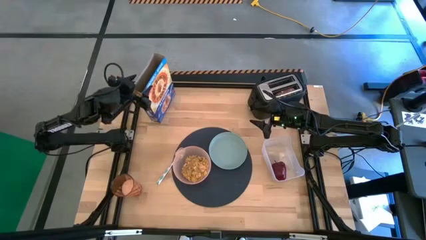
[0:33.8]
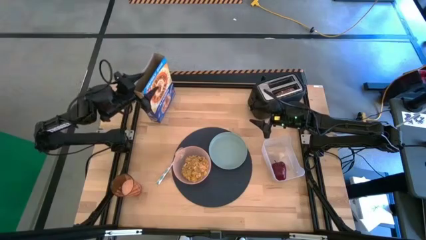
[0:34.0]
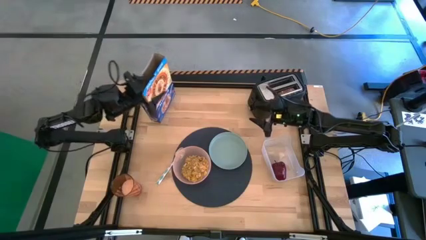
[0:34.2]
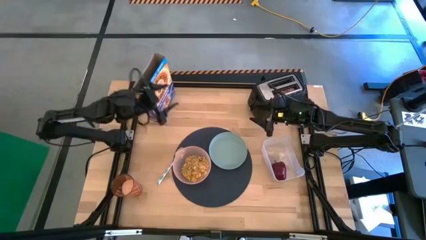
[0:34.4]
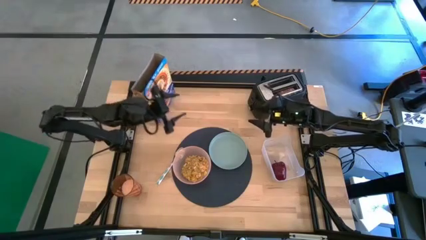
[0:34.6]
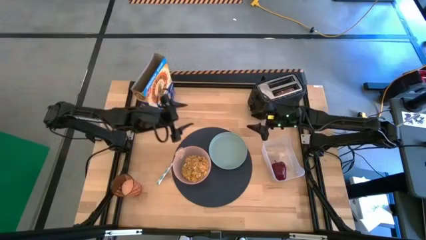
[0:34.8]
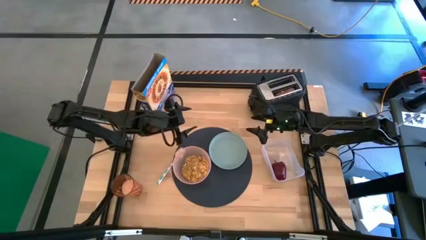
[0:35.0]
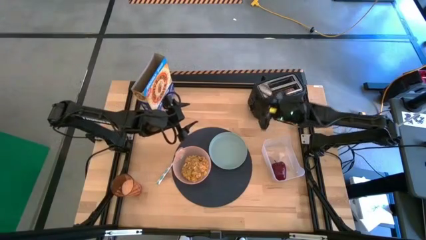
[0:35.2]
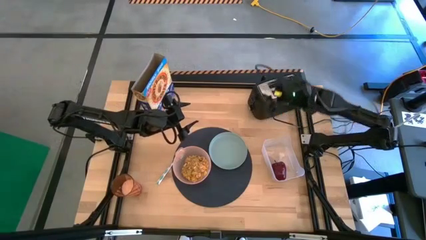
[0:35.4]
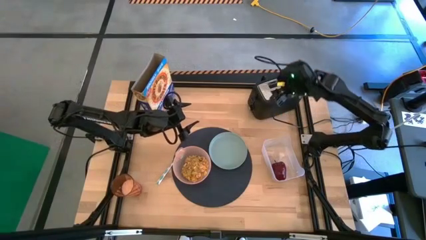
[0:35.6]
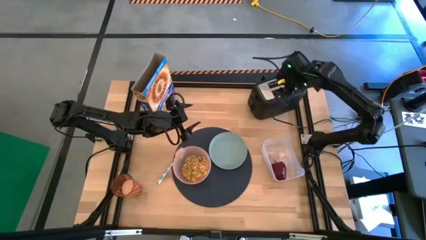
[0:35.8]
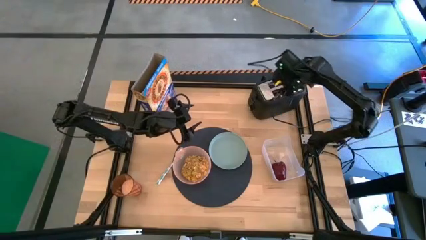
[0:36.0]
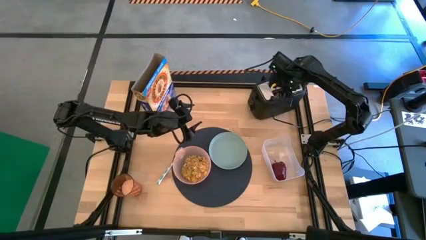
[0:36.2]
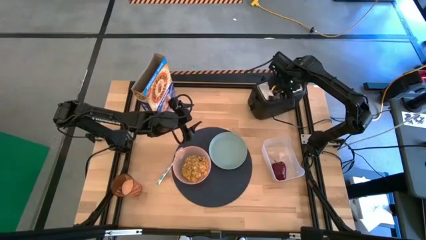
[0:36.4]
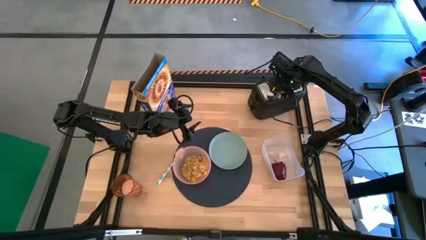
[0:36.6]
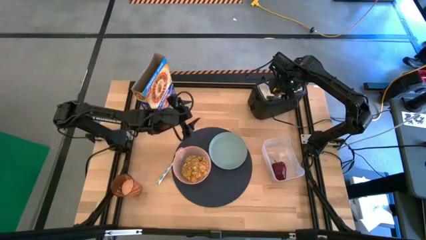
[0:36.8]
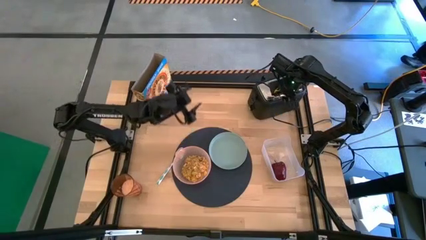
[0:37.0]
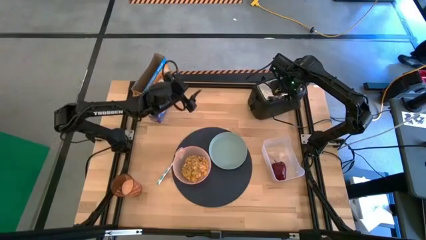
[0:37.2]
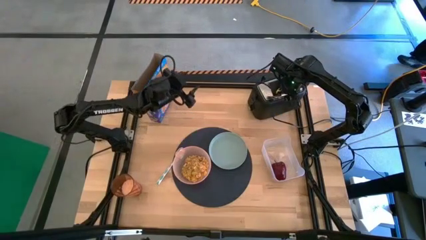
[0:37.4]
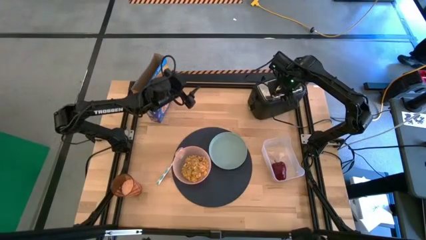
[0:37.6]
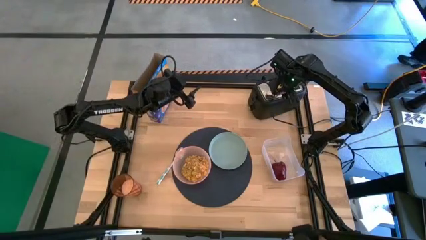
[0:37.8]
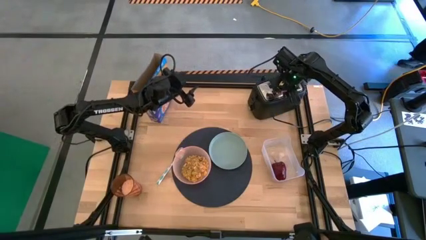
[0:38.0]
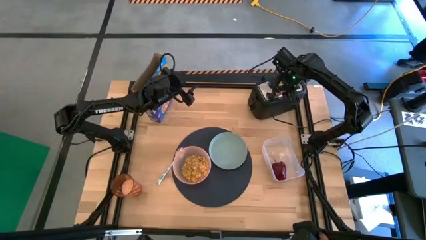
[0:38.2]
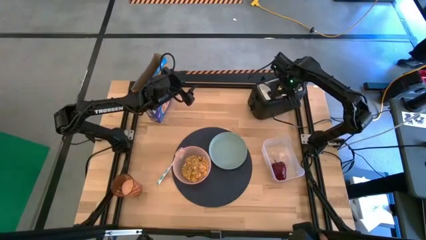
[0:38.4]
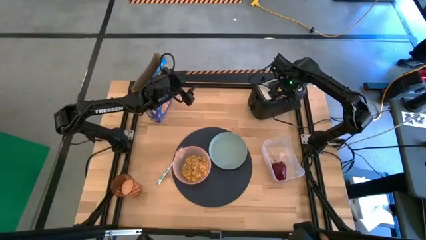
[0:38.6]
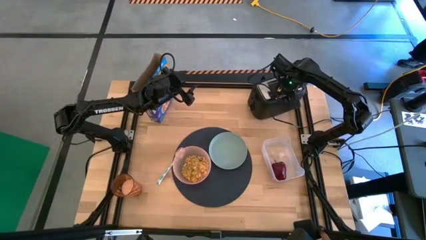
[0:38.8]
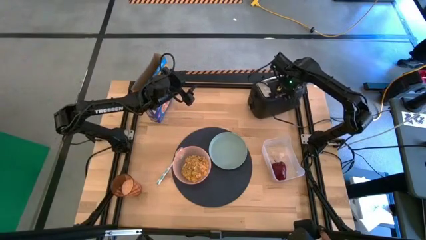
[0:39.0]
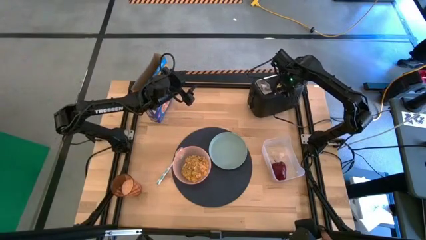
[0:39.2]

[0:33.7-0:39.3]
Task: Arrange a breakfast setting
Put the toasted bread from the toaster on the blue plate

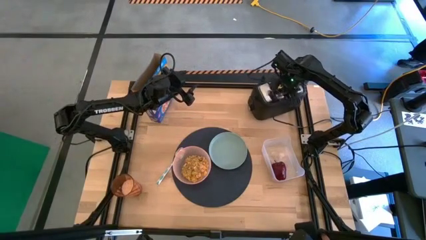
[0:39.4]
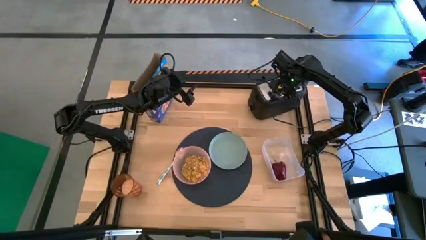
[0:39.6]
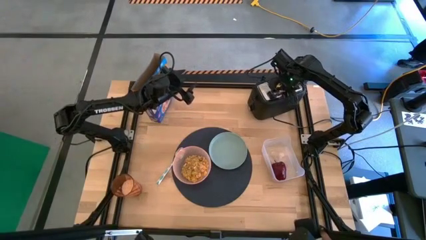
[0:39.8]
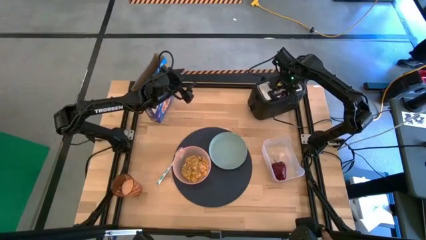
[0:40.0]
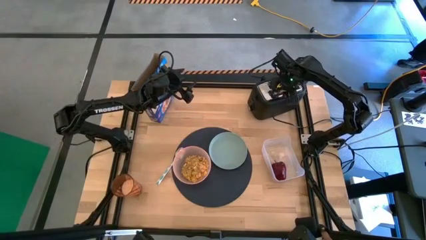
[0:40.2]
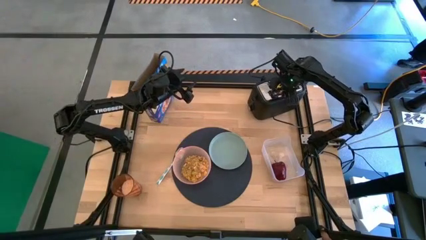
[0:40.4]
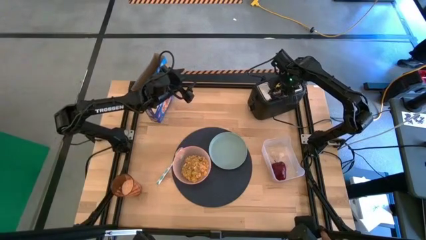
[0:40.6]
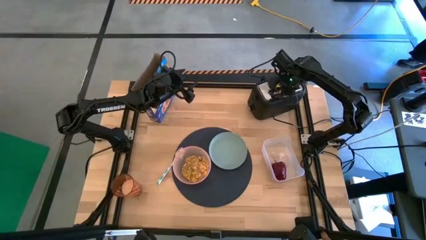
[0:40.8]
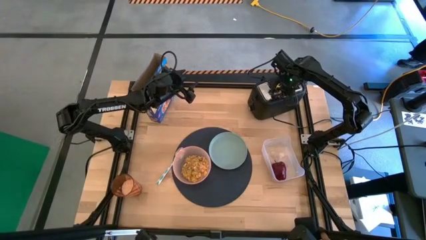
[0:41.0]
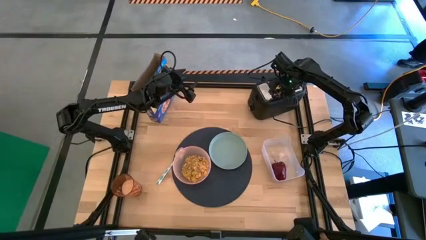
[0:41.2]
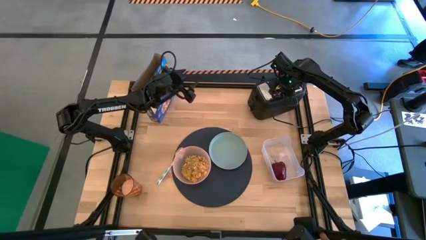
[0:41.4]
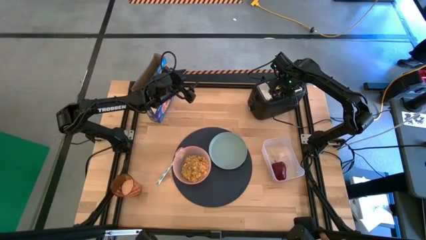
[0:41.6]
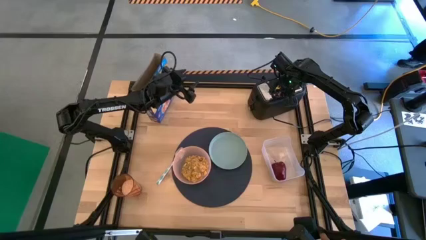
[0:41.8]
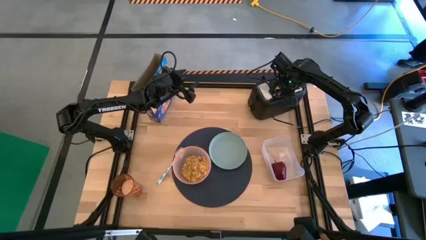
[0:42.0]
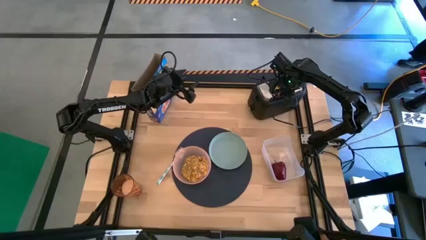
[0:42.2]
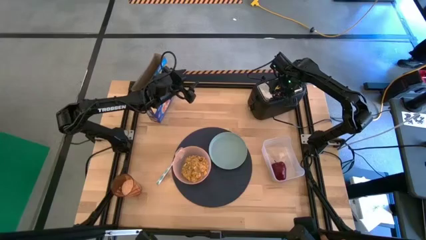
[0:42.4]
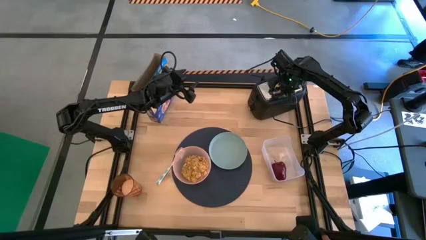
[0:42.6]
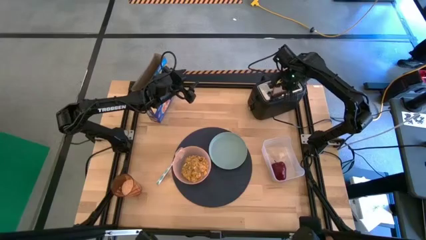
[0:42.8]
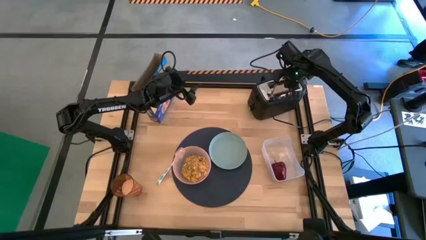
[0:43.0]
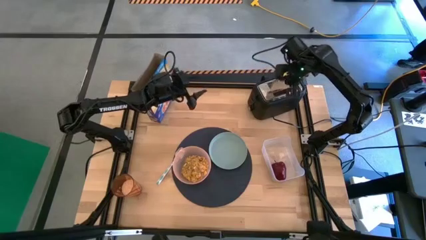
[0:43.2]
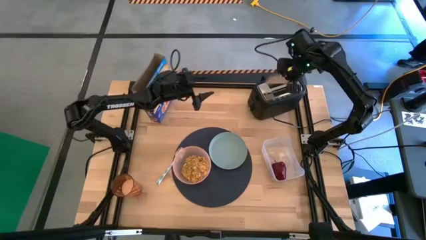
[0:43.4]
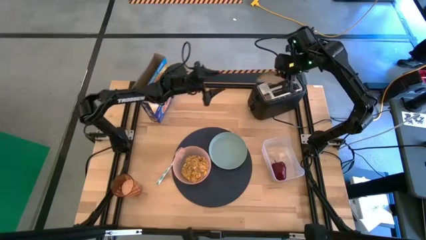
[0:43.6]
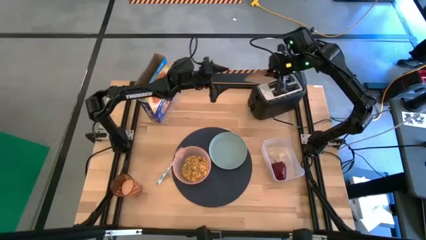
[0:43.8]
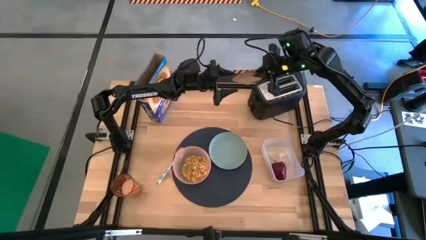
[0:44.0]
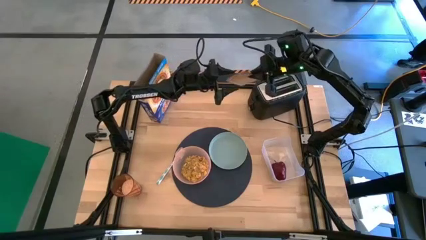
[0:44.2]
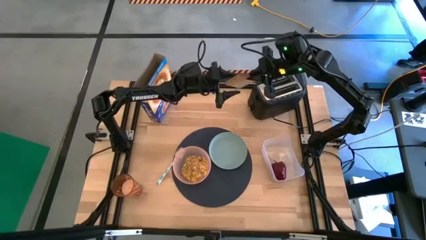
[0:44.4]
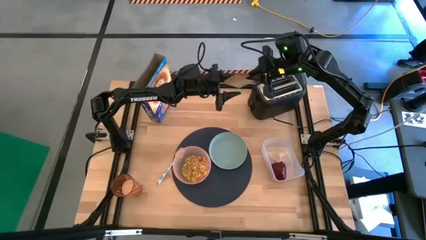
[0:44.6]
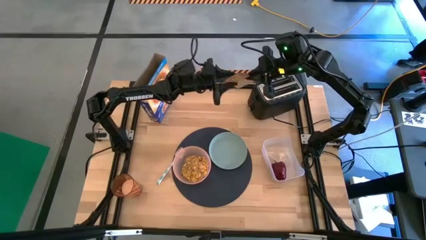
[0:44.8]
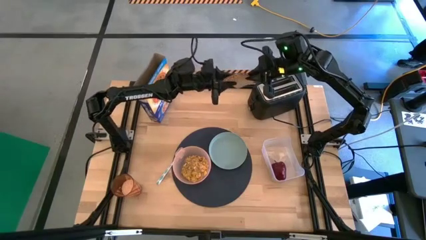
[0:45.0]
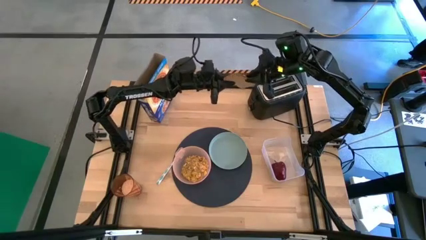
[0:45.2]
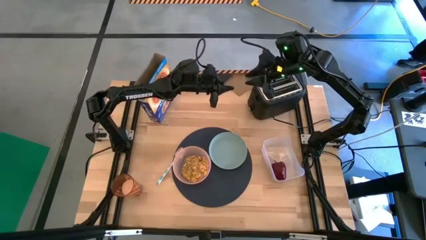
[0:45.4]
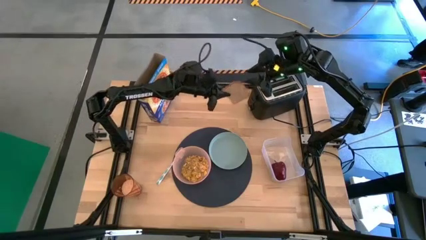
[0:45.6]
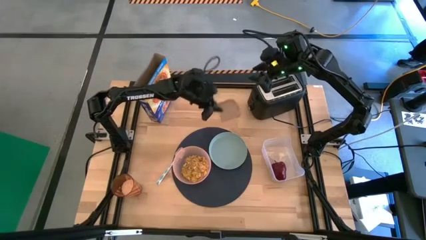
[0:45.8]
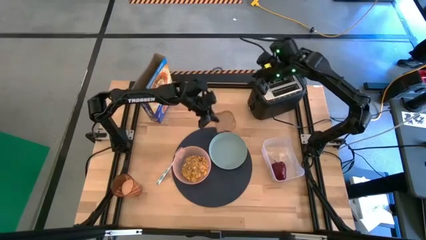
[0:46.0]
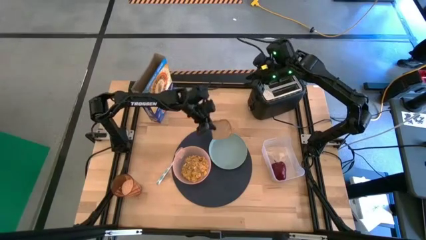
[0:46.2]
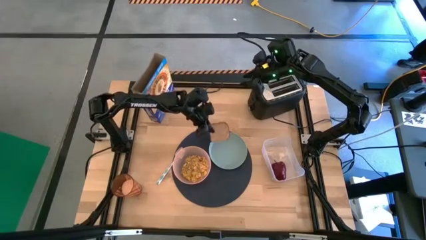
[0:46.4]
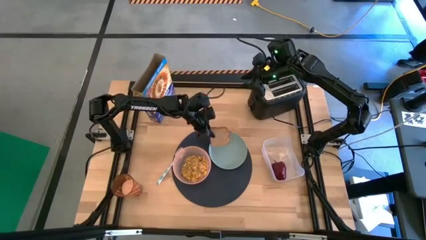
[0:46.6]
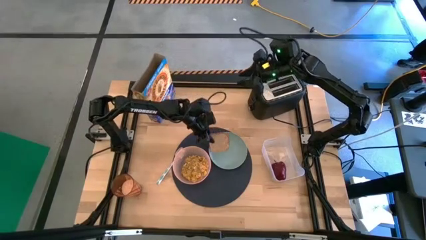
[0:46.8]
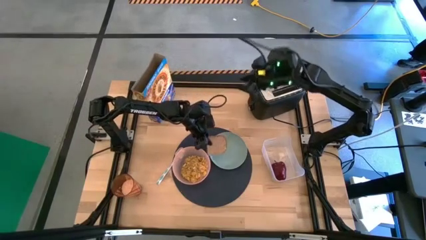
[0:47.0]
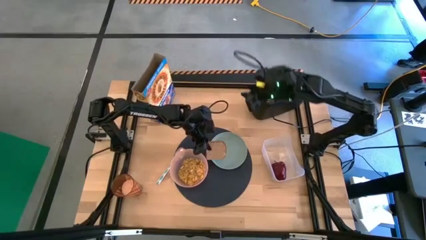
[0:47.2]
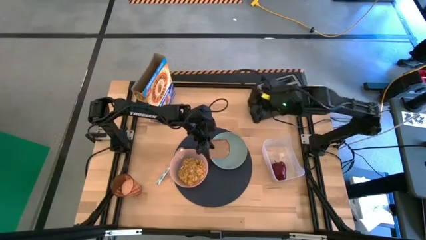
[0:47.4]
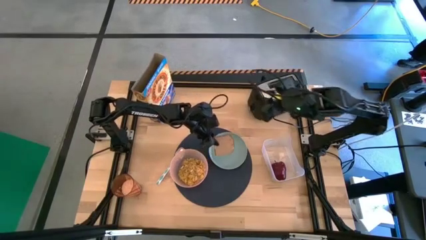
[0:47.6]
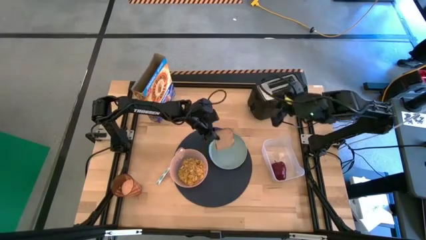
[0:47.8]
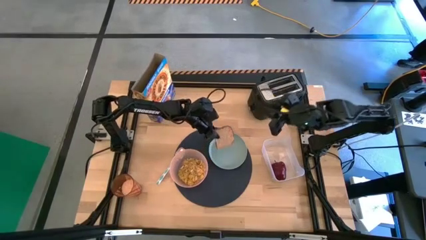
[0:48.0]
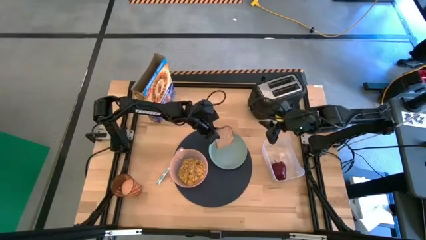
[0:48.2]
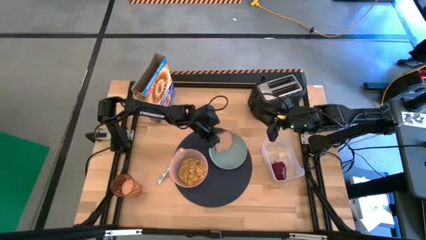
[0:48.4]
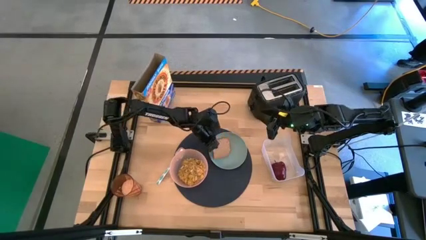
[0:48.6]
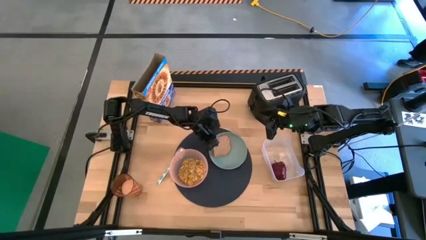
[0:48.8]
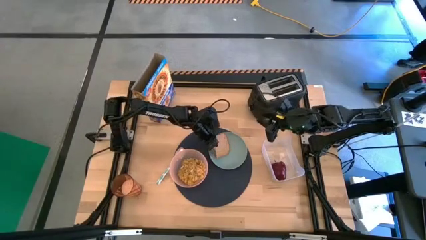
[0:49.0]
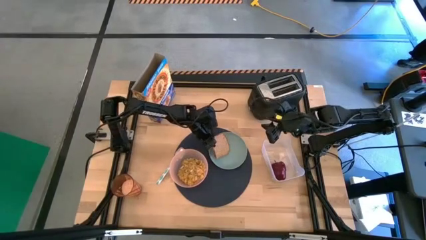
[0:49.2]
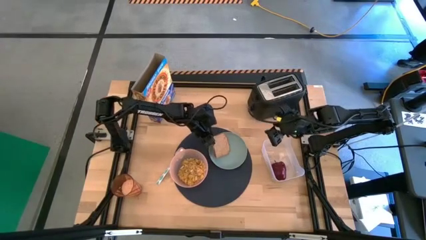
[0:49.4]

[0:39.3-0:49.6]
Put the toasted bread from the toaster on the blue plate
